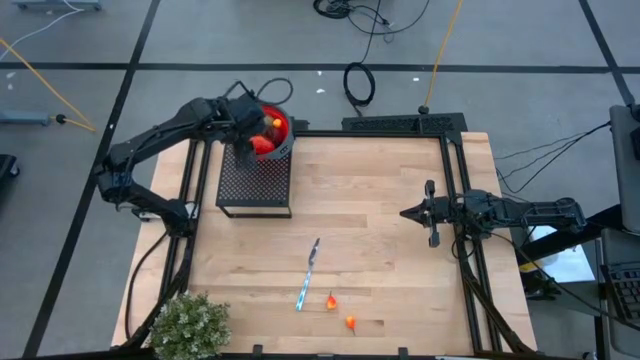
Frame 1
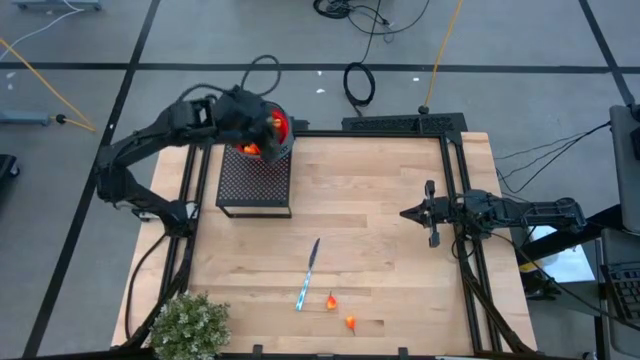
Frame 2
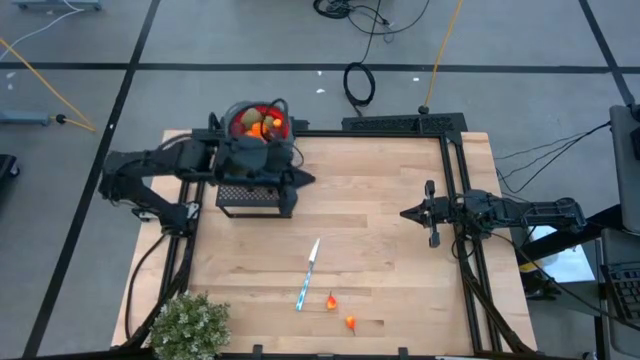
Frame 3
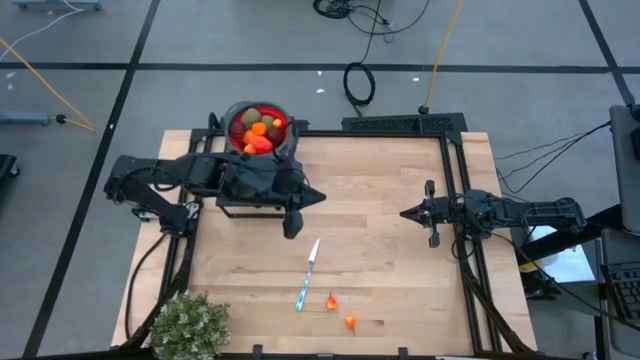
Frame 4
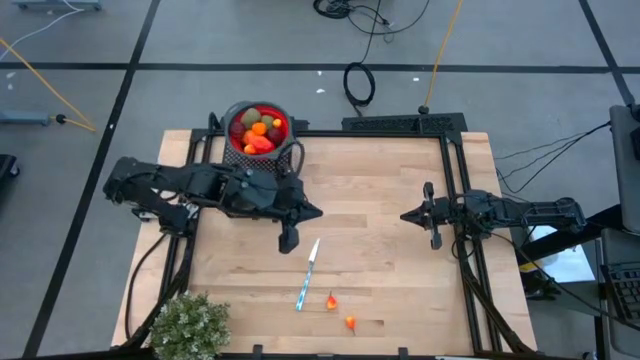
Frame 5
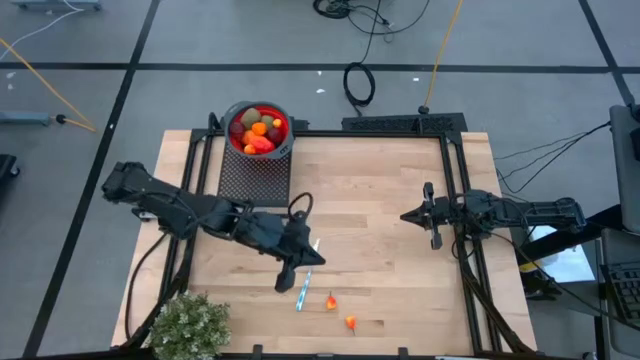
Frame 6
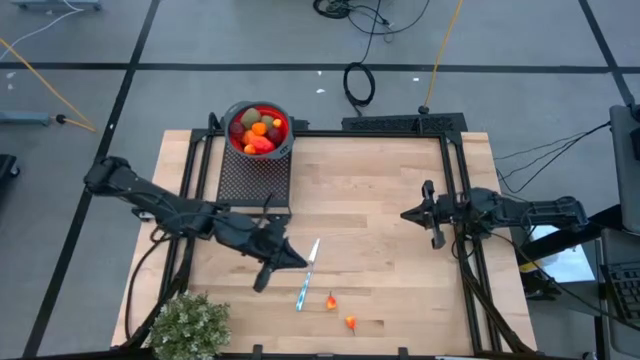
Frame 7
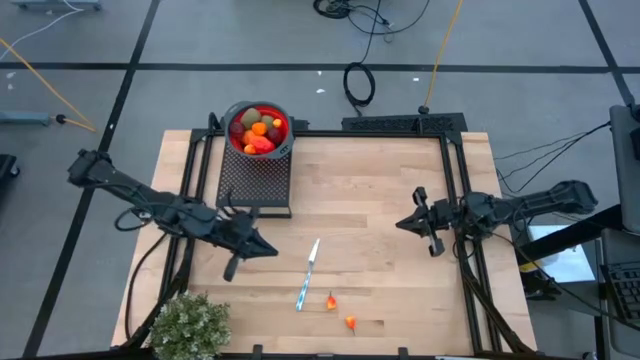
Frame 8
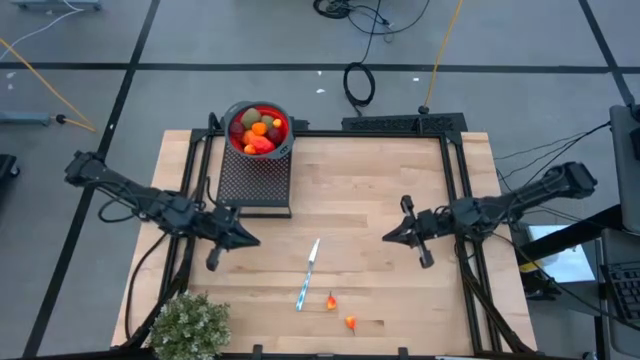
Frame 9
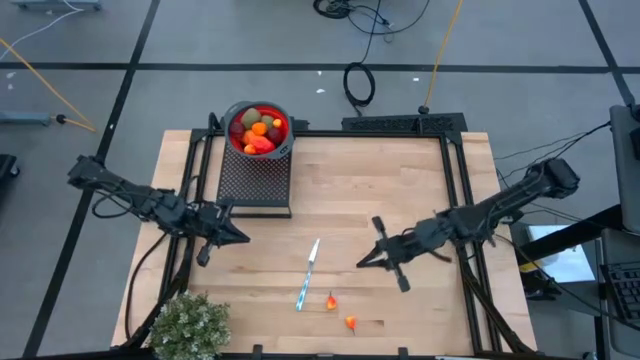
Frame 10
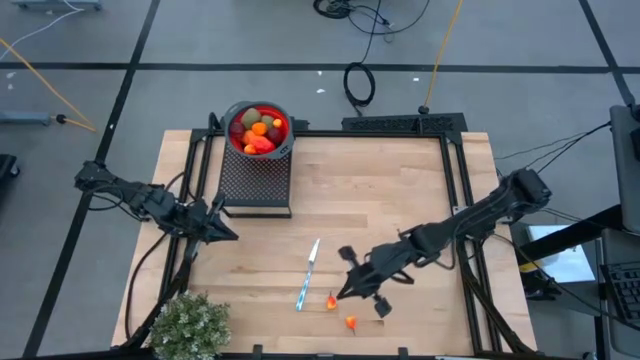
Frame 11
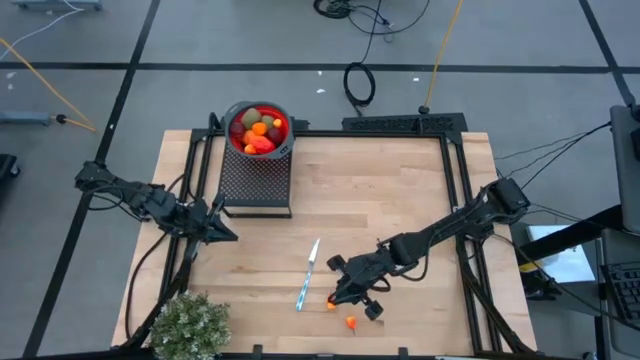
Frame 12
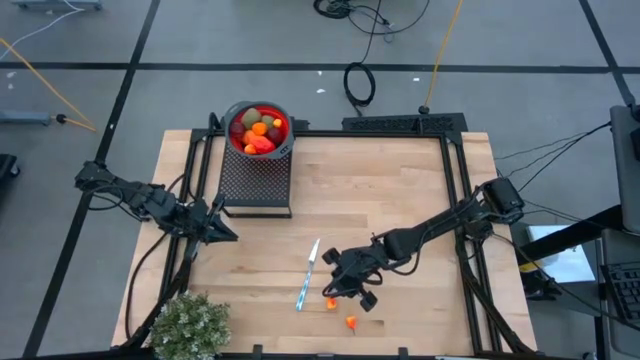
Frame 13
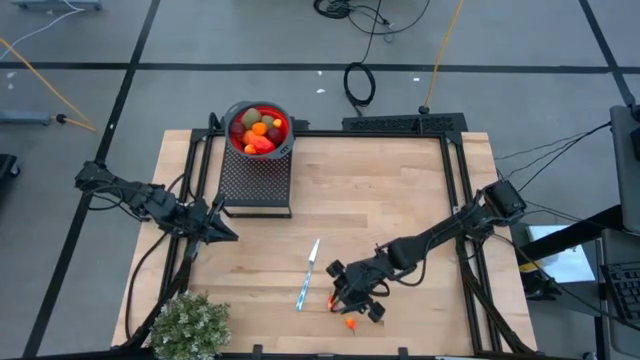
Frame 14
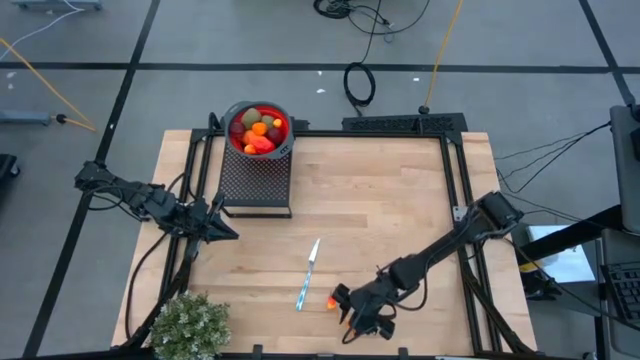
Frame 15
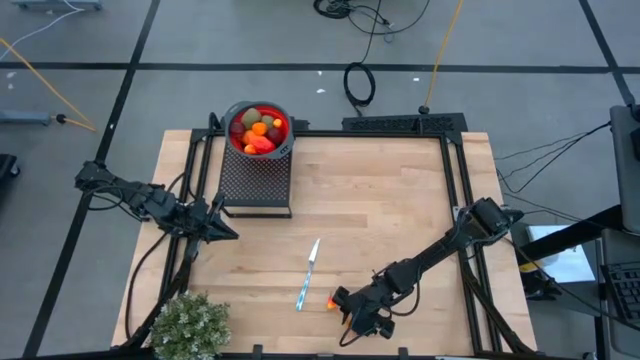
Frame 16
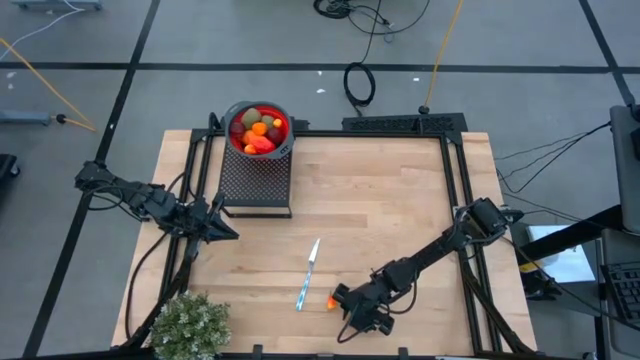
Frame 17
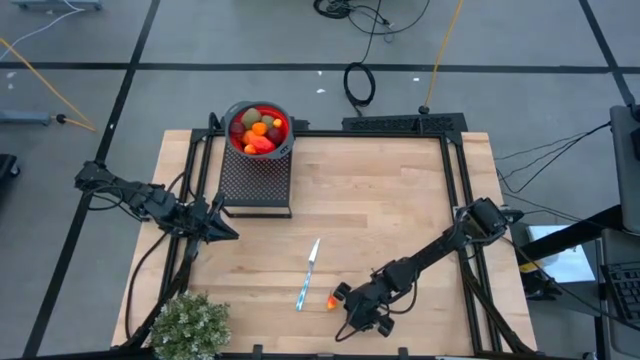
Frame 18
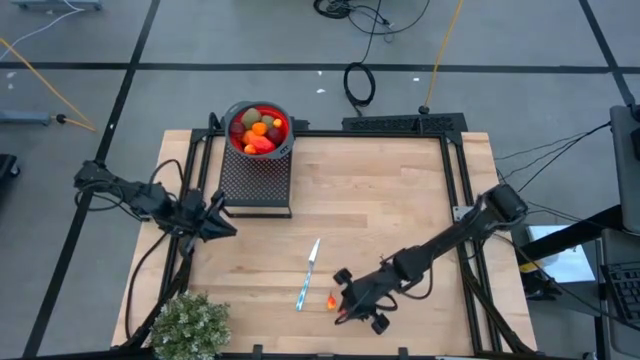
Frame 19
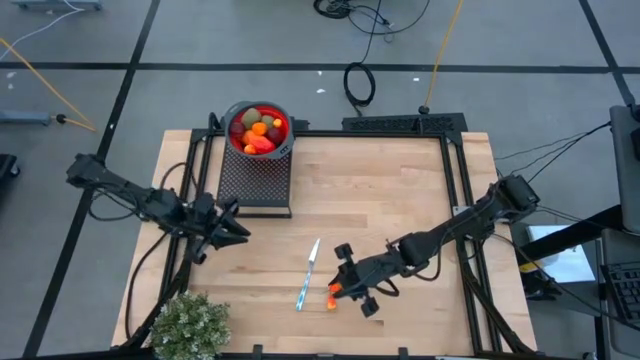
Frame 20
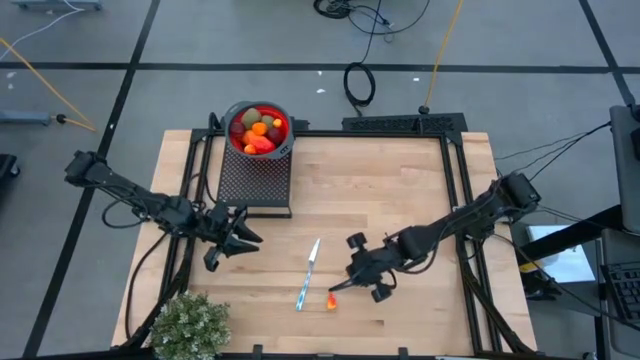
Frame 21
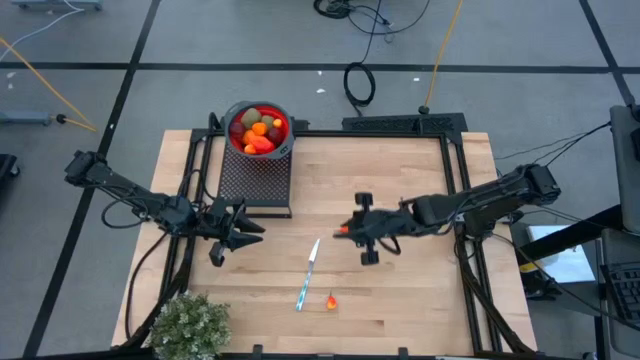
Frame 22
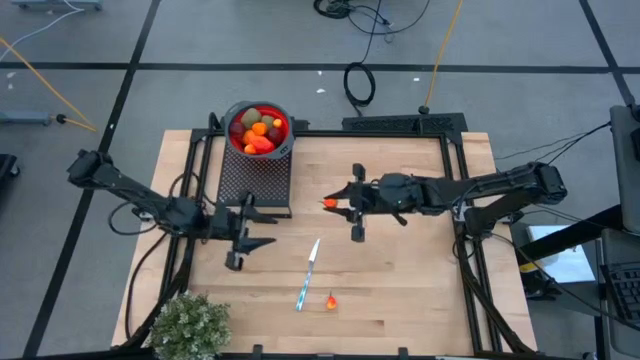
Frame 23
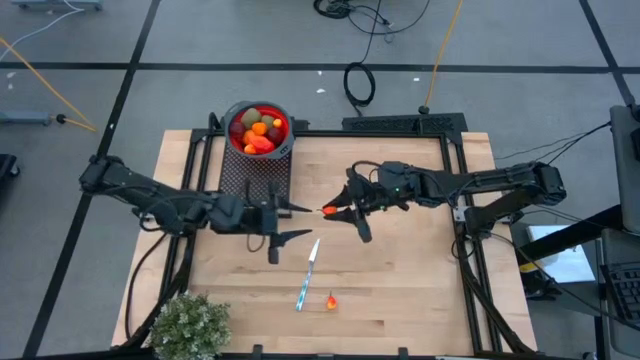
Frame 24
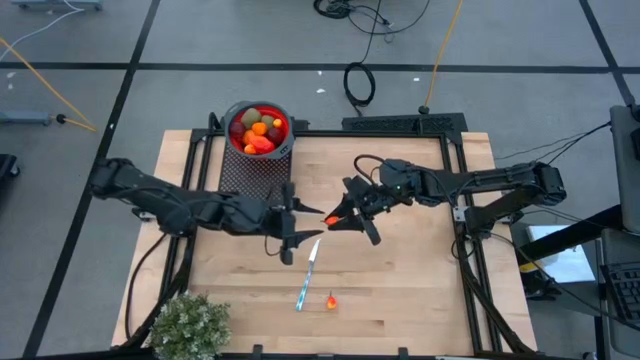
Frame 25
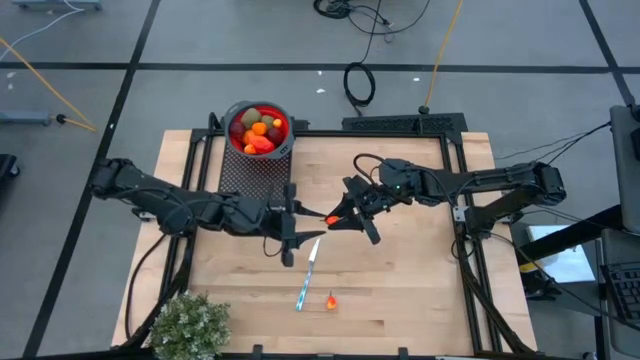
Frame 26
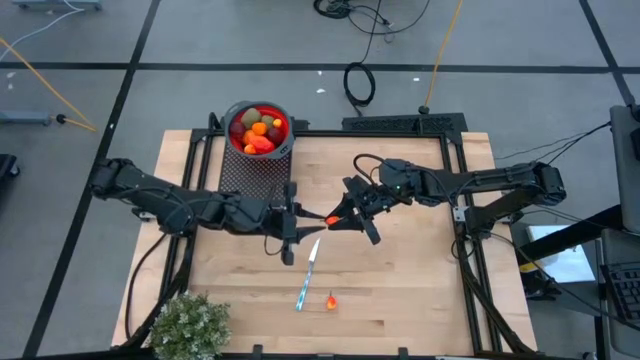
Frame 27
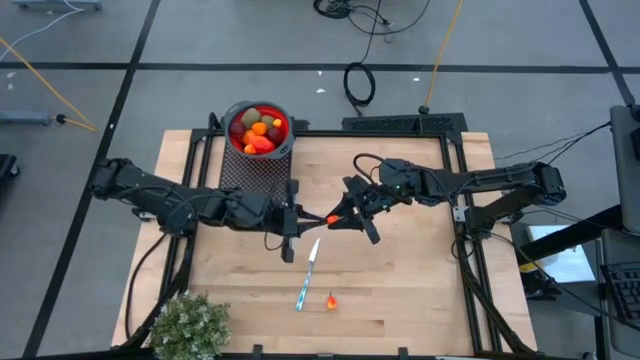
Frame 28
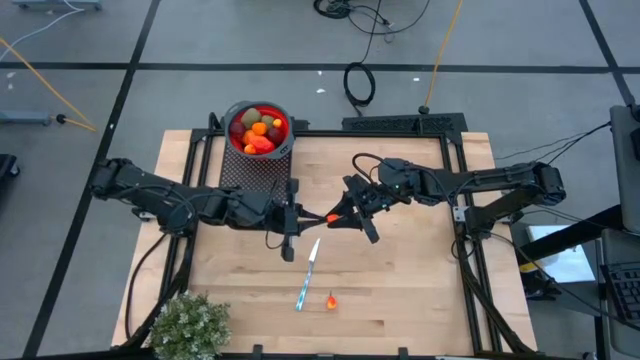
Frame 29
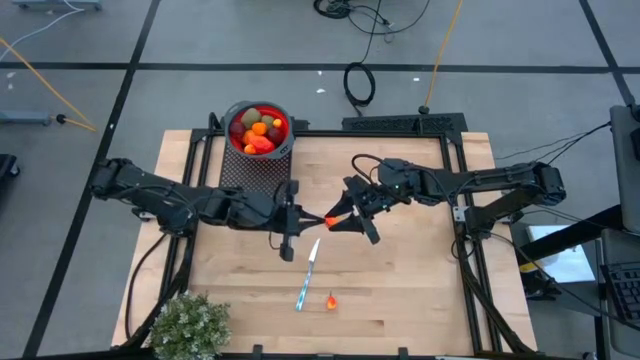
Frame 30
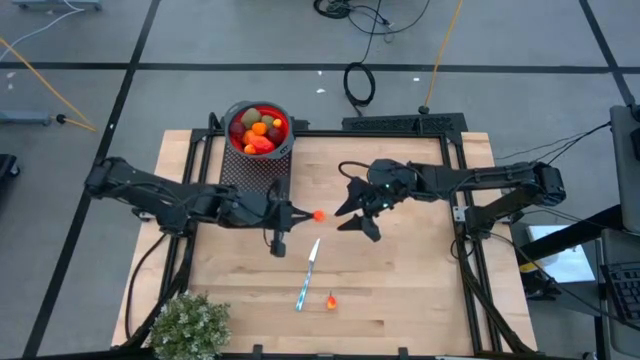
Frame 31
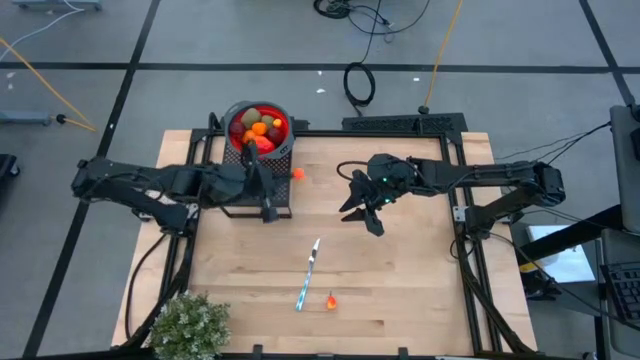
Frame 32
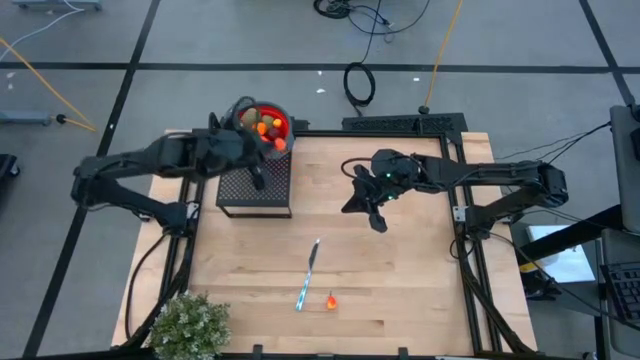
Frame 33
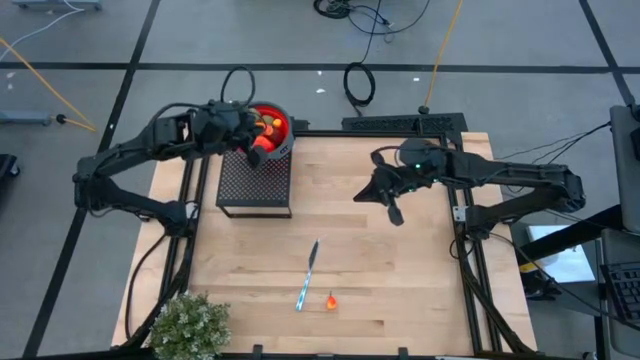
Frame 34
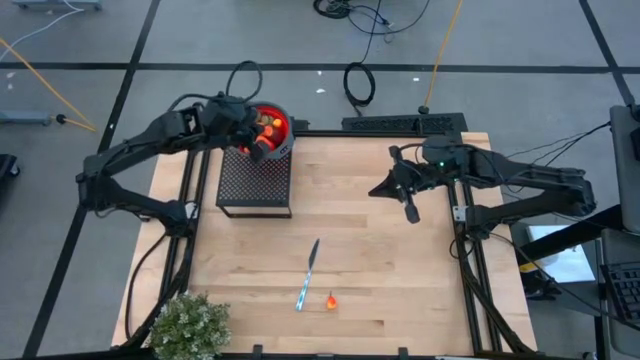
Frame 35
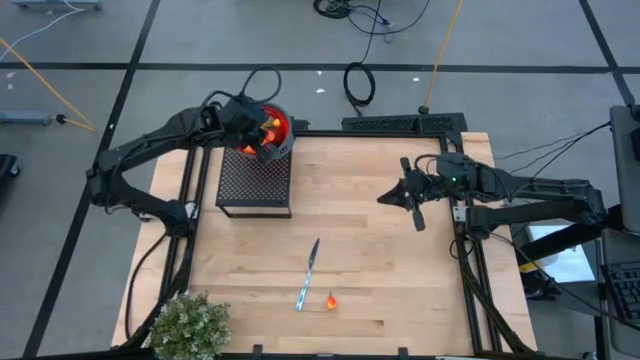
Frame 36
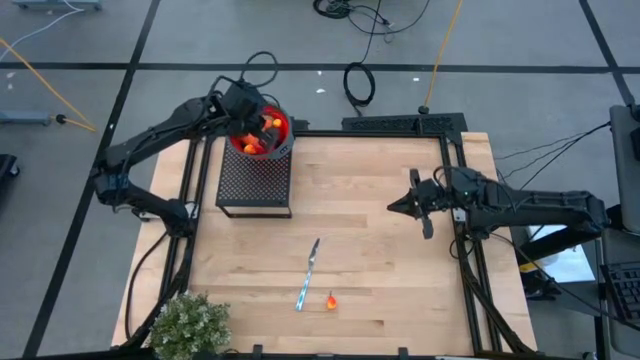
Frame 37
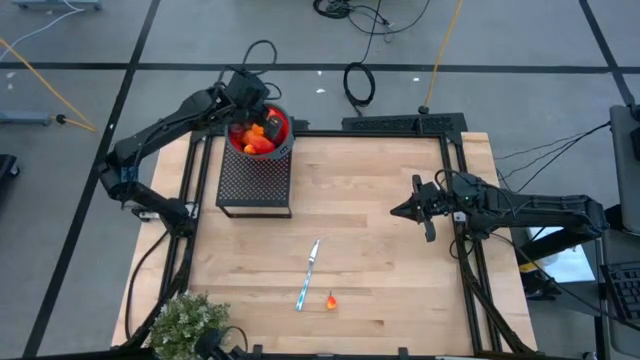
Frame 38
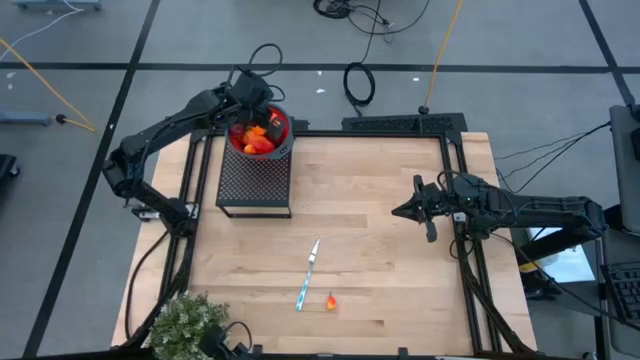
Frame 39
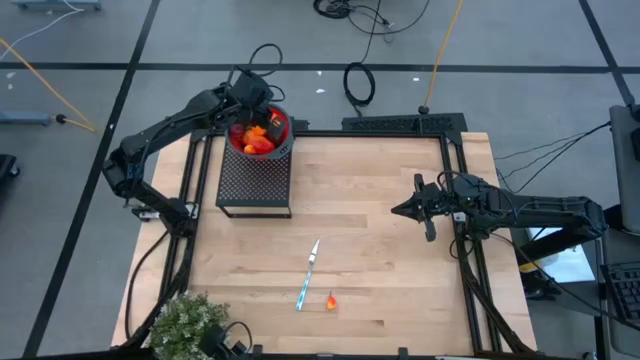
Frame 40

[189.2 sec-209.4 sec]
Task: Pick & Place Fruit
Put the orange pear into the red strainer bowl on the shelf

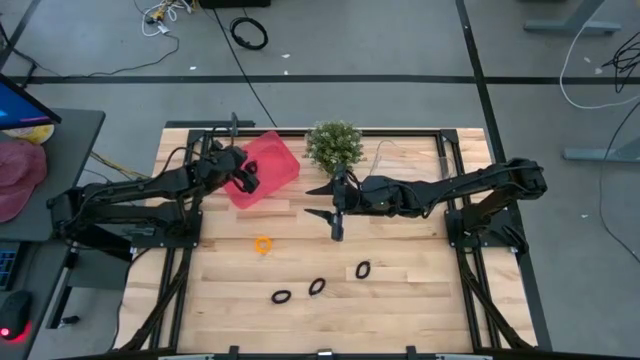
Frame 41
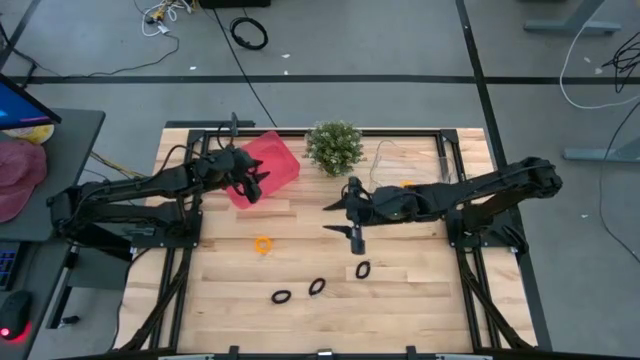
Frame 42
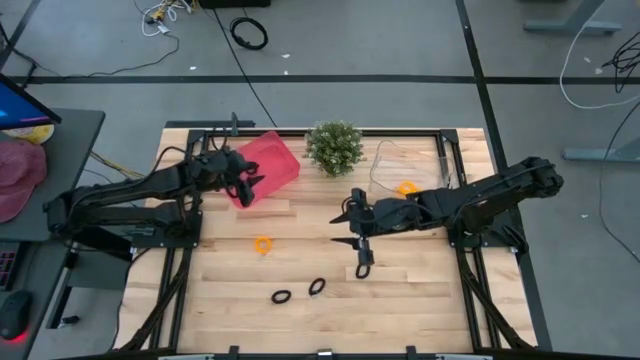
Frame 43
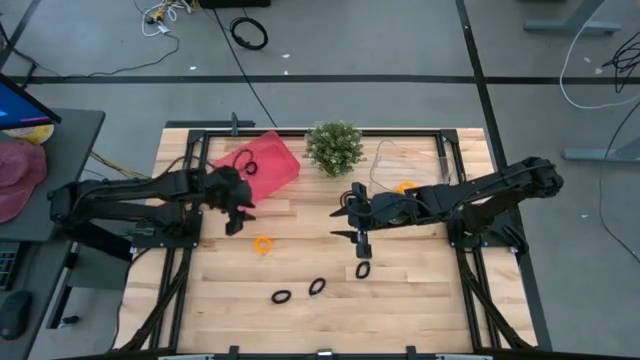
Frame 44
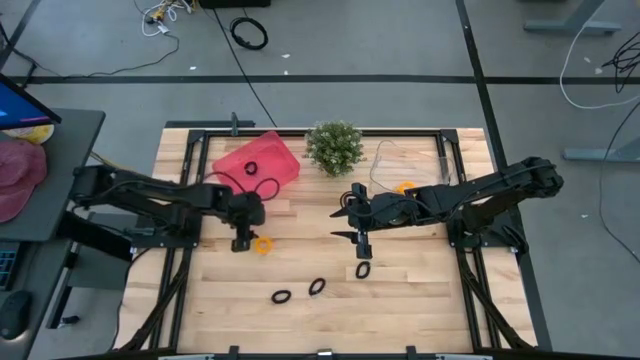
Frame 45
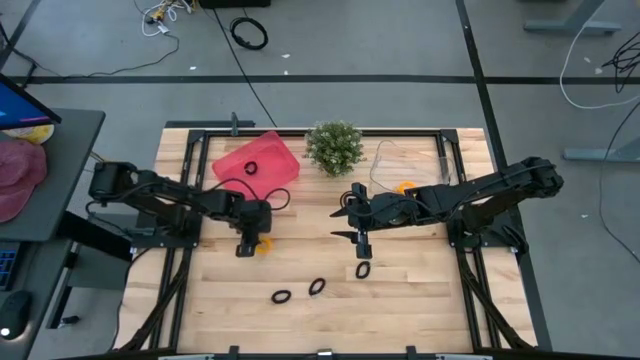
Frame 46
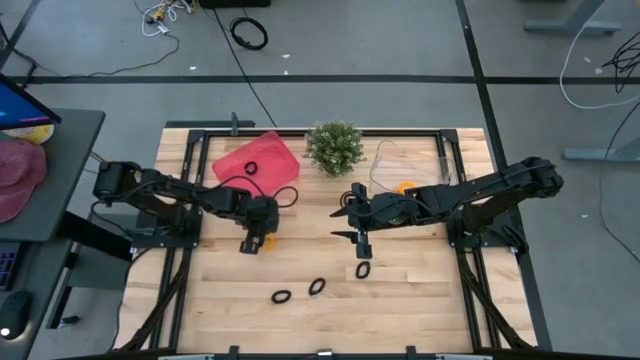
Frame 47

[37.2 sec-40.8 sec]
Task: Sort spring keychains
Put the orange spring keychain into the transparent bin
